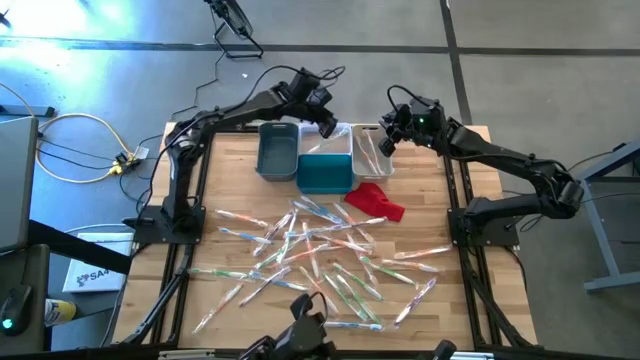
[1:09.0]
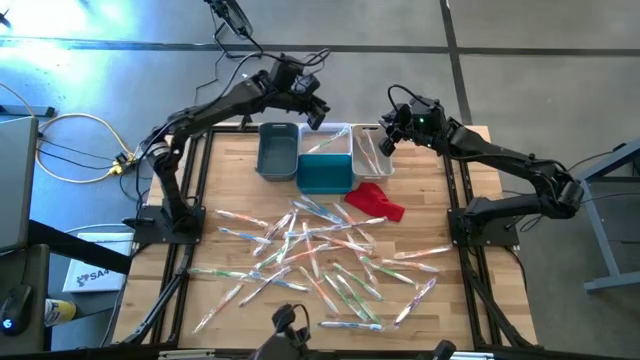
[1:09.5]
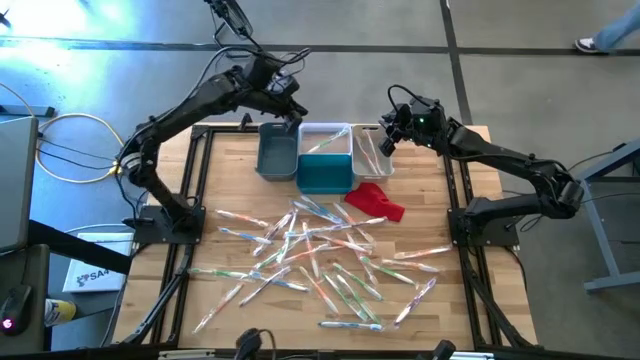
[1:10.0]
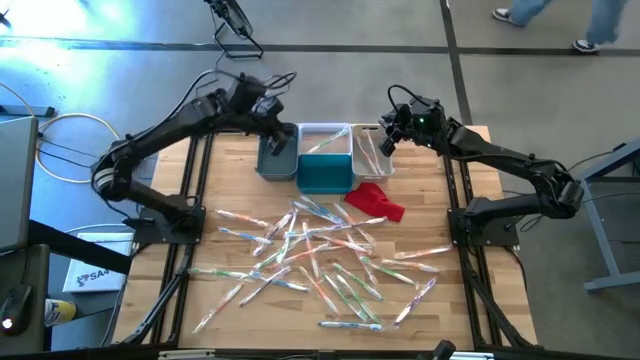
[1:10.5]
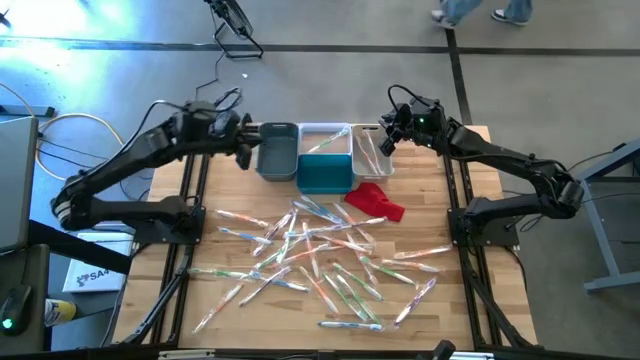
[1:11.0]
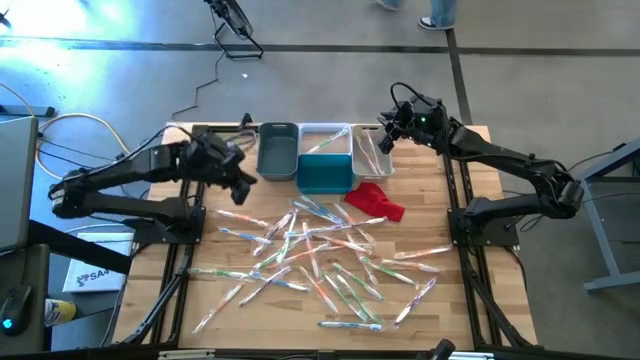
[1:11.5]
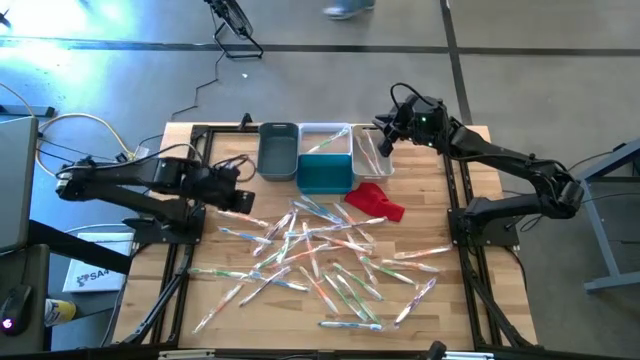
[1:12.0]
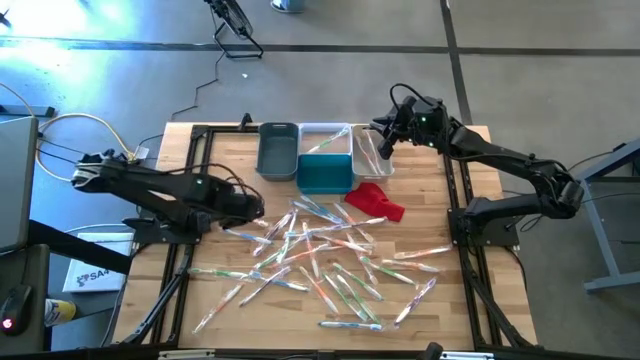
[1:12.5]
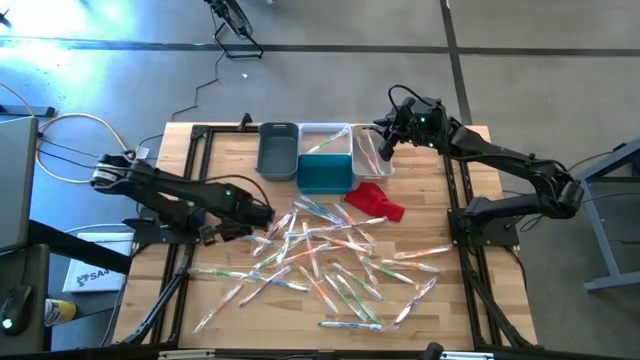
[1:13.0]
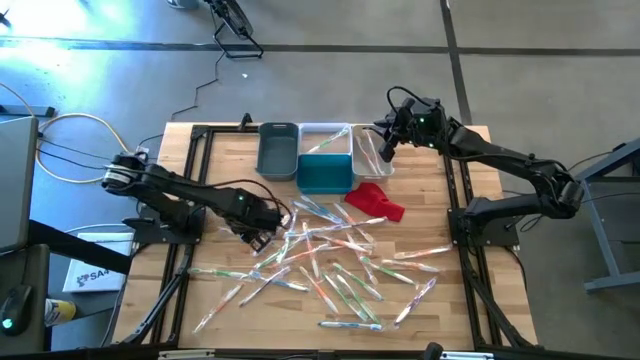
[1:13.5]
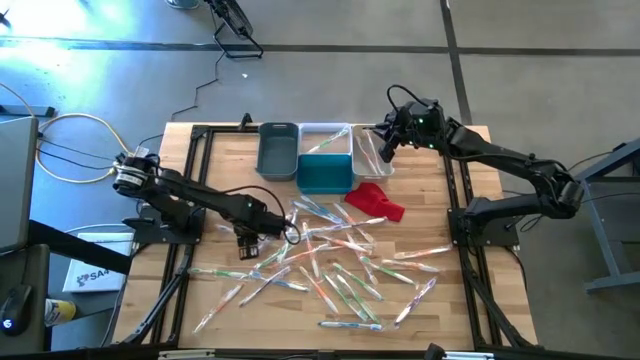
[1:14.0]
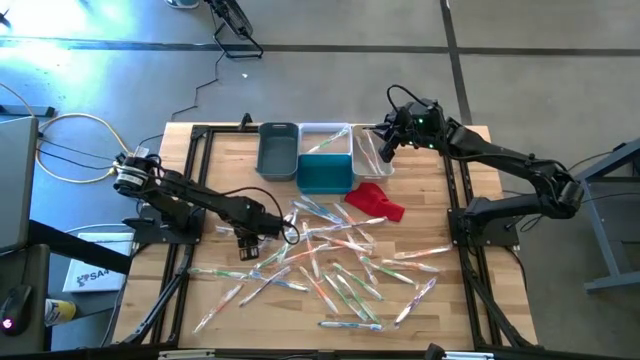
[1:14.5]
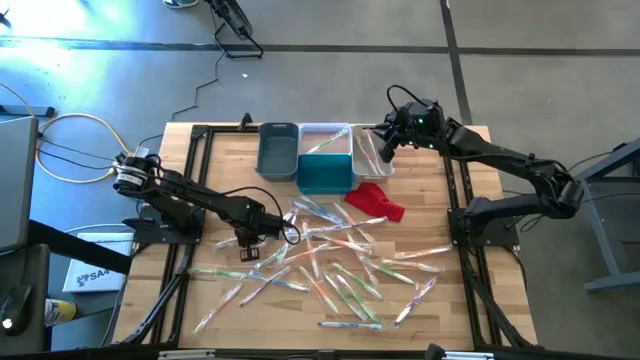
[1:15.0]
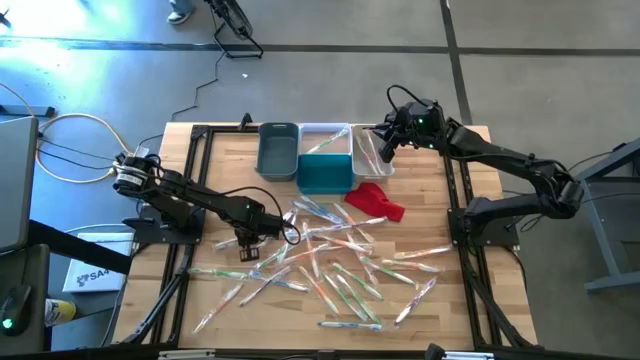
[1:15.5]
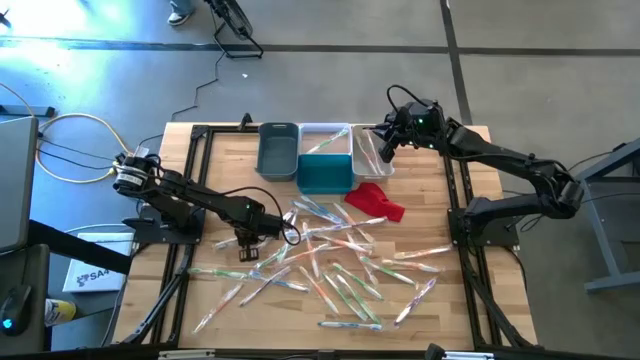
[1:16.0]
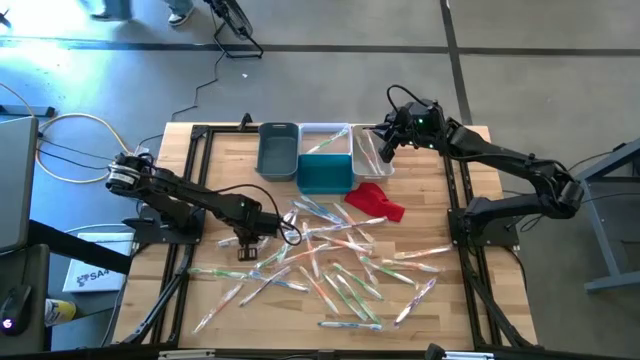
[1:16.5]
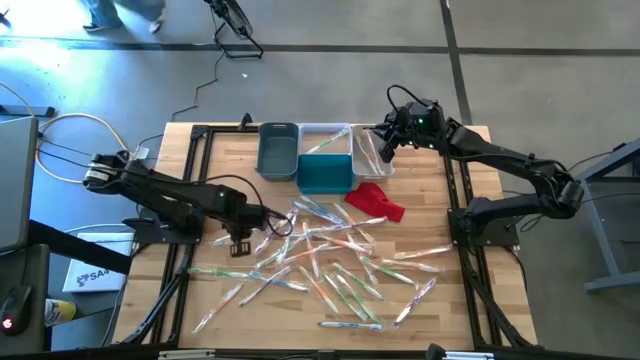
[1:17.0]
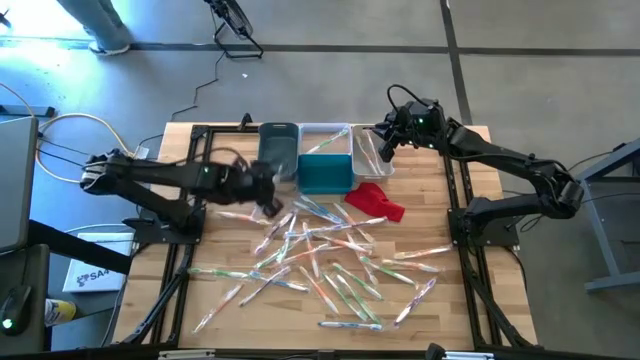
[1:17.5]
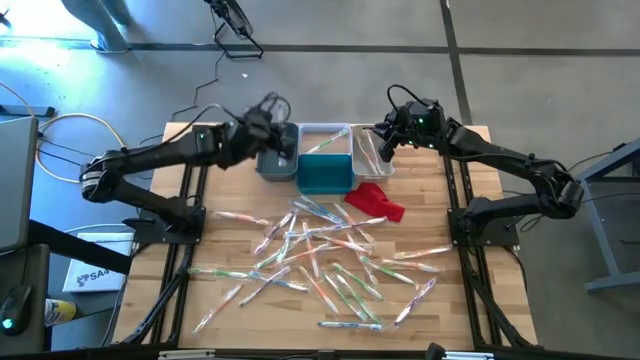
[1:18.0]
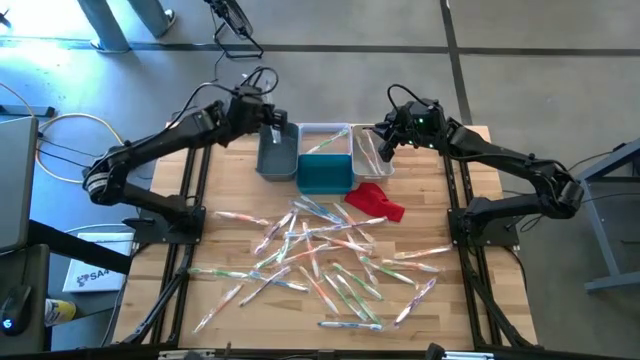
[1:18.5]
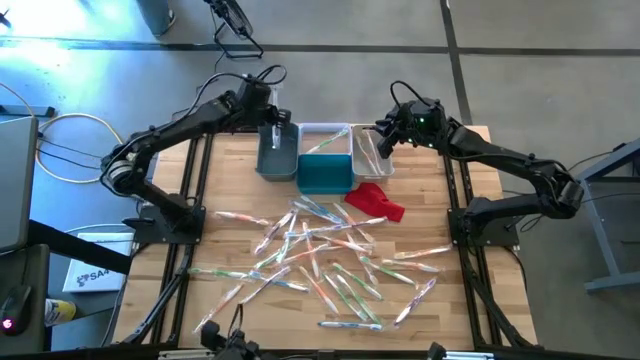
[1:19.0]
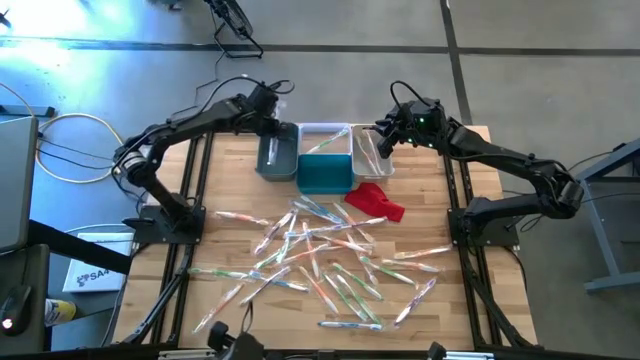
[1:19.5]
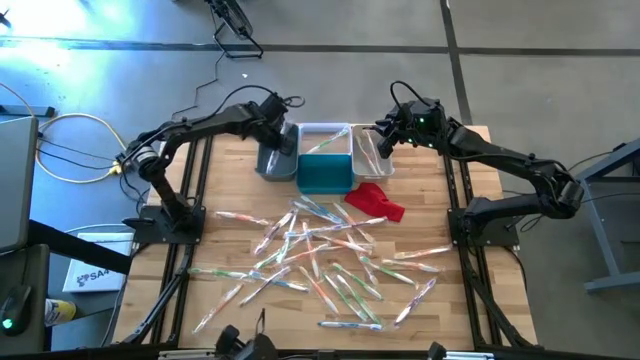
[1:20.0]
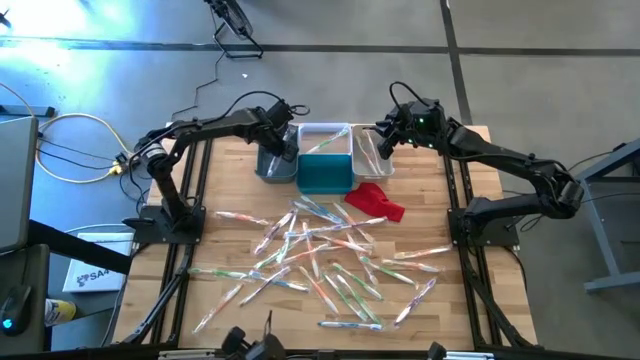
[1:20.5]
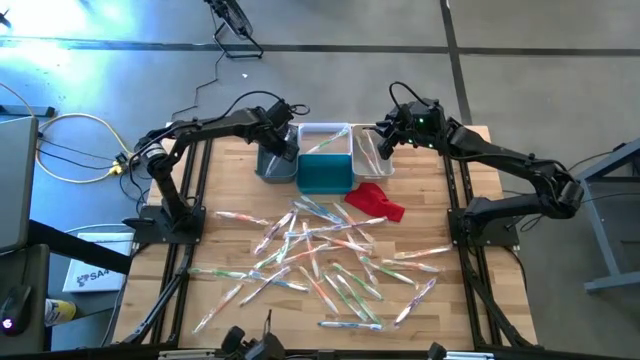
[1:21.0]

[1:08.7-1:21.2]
Task: Pick & Place Toothbrushes
Put the blue toothbrush into the gray bin

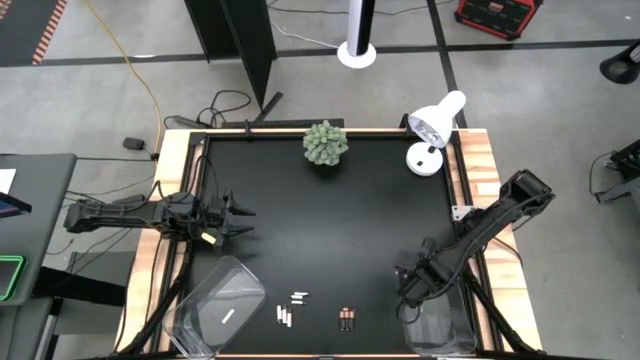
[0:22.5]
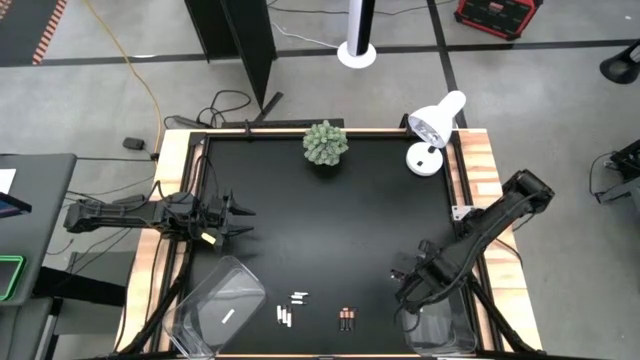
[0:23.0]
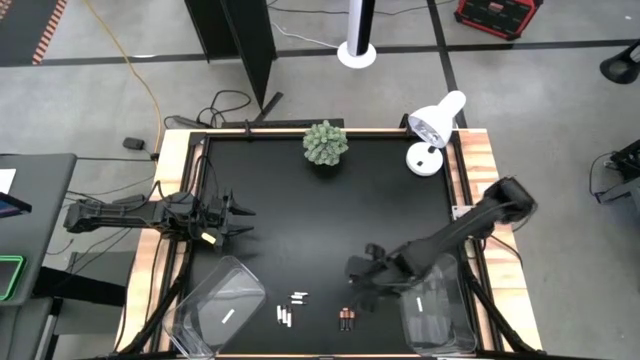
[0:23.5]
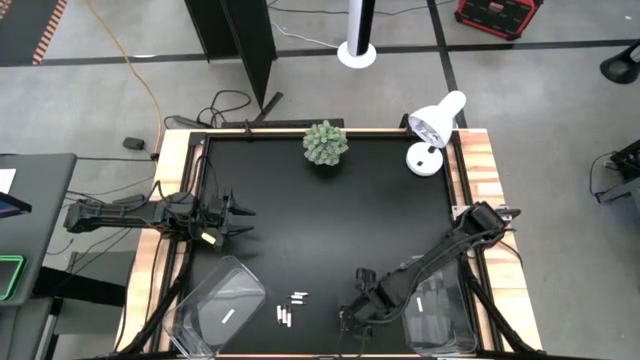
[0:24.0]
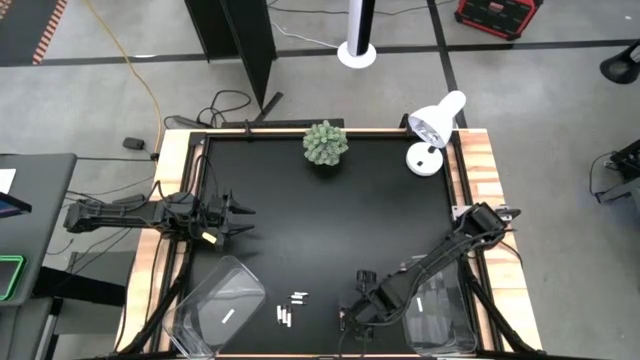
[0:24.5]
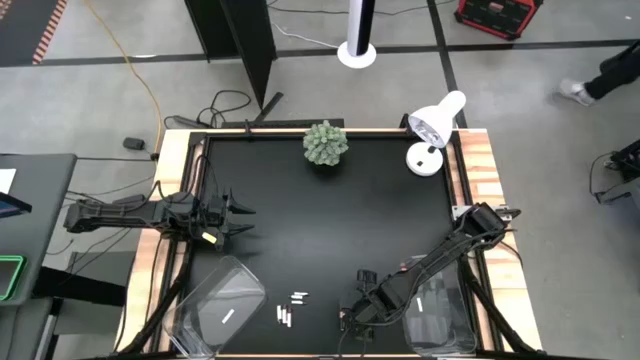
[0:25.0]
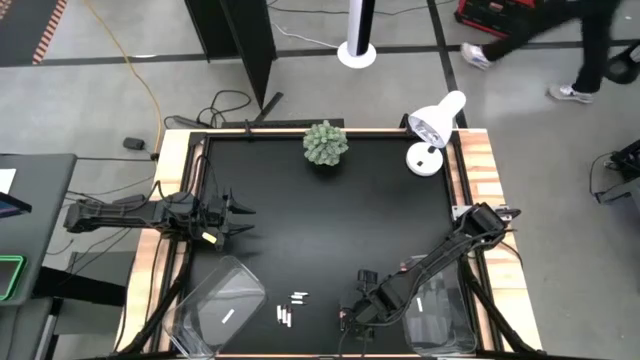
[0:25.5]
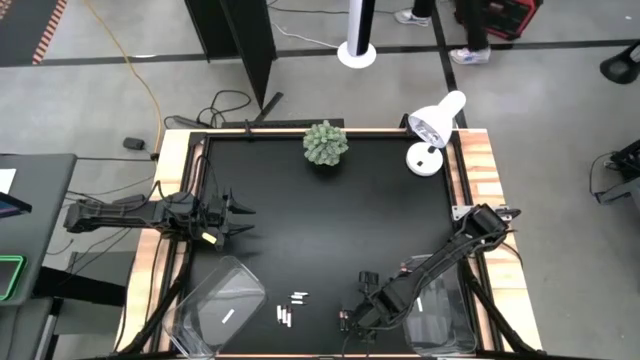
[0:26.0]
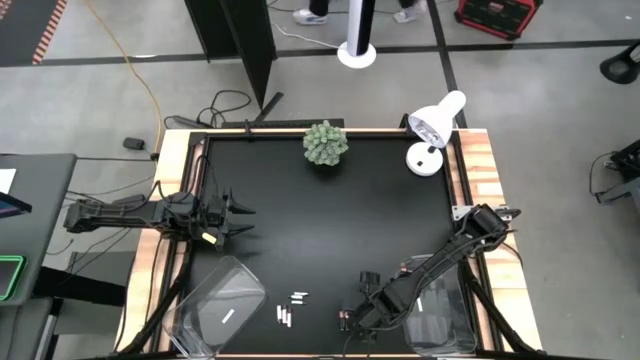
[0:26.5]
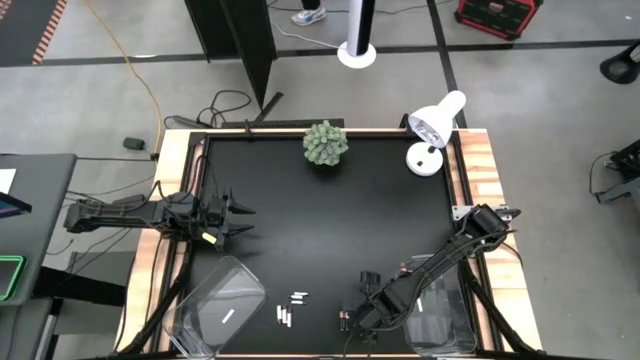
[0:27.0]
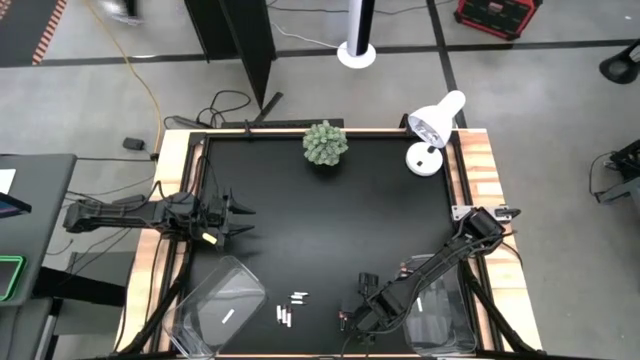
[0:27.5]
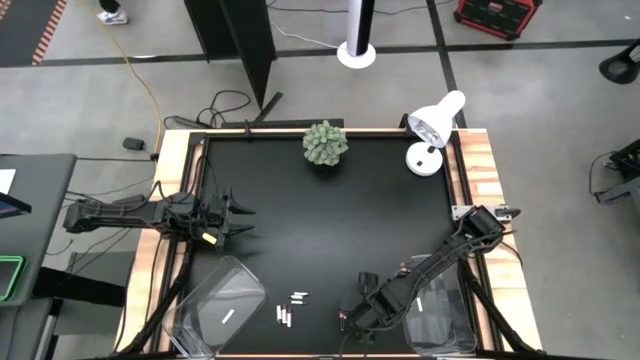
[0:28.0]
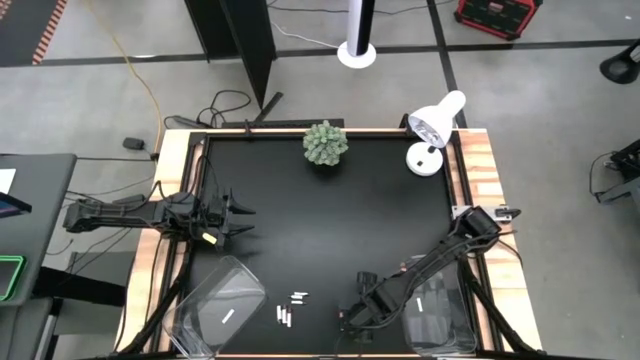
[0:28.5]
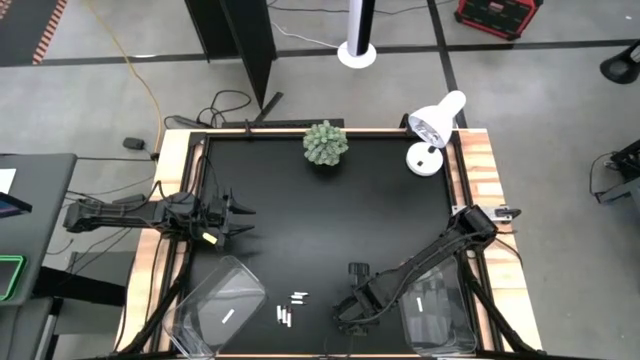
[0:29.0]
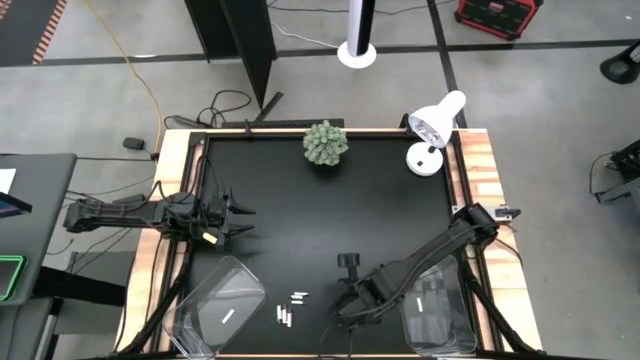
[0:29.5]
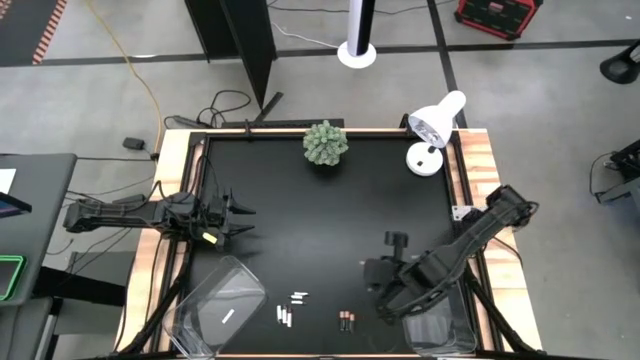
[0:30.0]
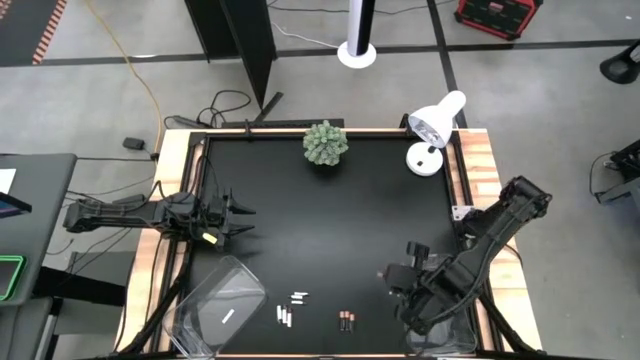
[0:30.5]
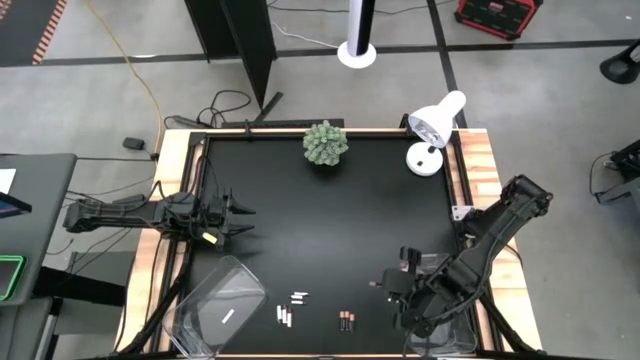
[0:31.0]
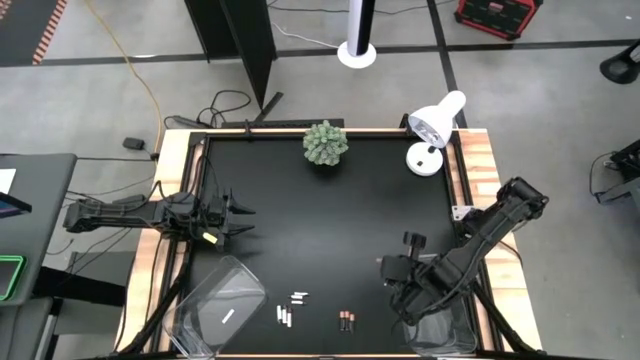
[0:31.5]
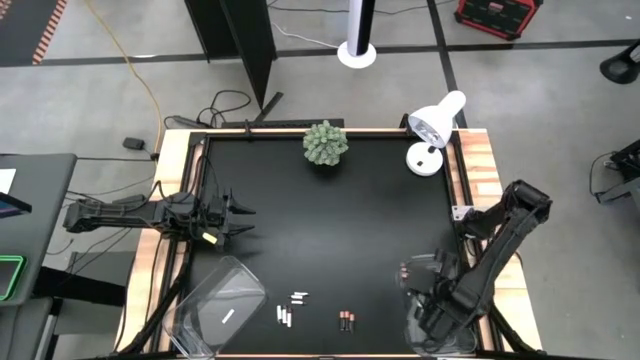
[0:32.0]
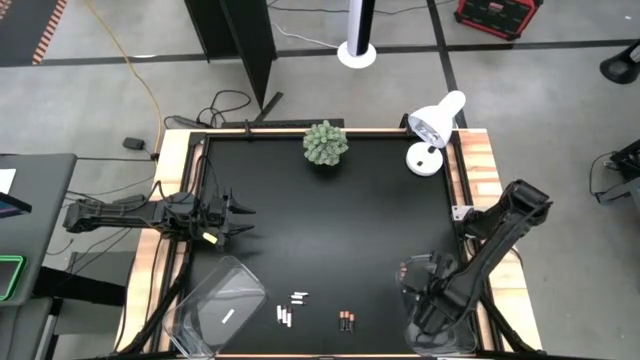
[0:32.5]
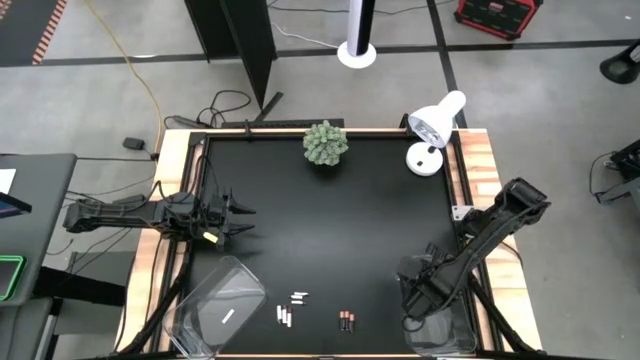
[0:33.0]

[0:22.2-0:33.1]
Task: Sort batteries
Put the black battery into the right transparent bin
